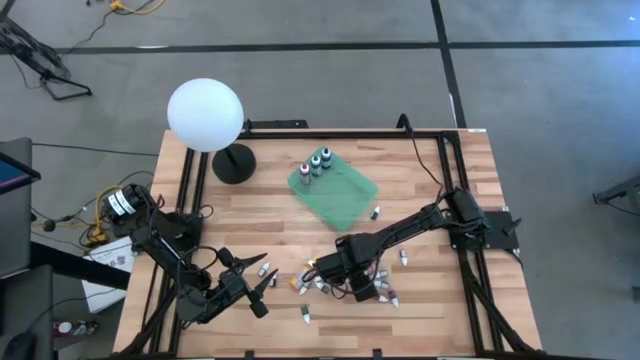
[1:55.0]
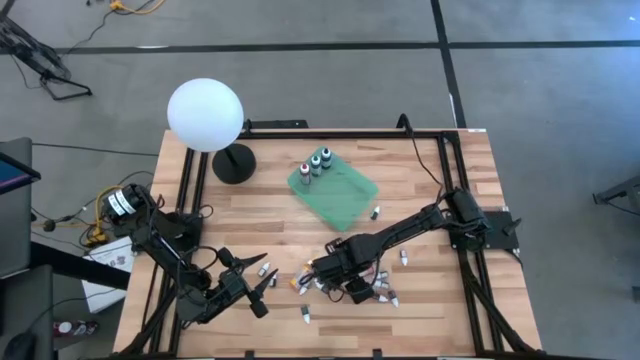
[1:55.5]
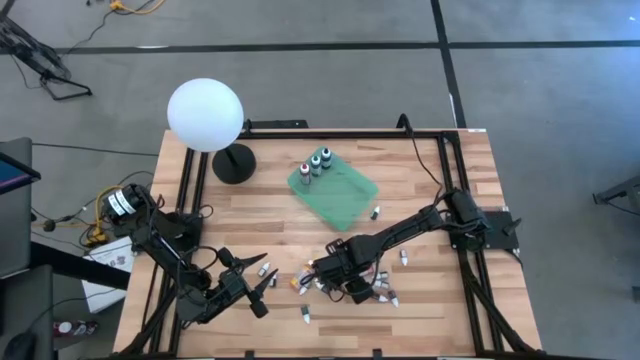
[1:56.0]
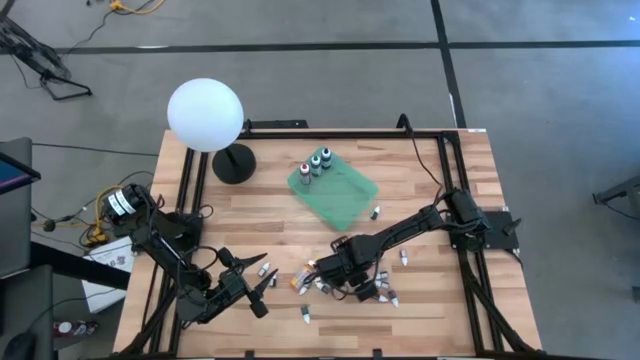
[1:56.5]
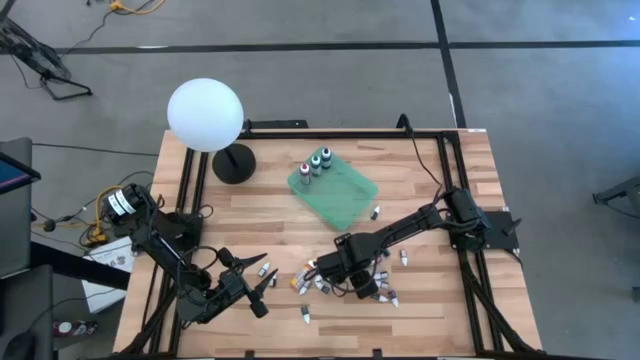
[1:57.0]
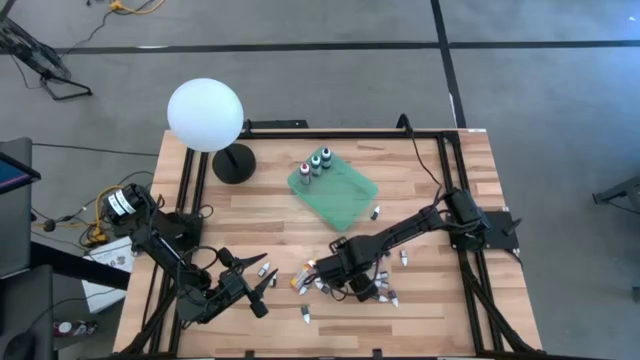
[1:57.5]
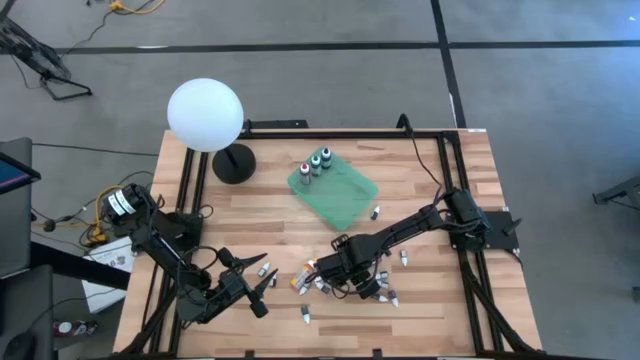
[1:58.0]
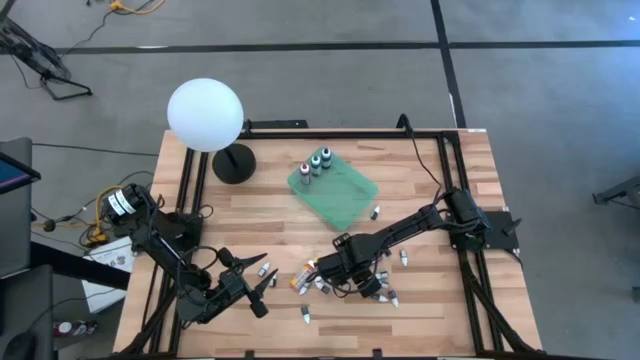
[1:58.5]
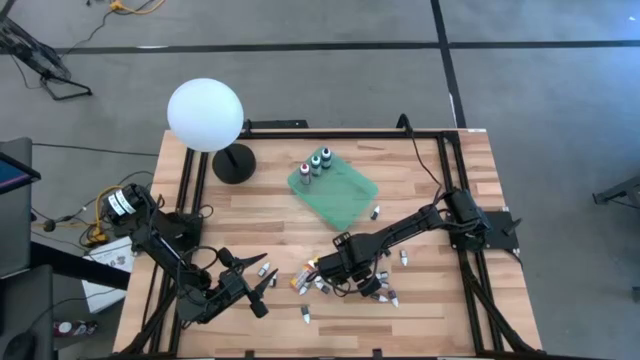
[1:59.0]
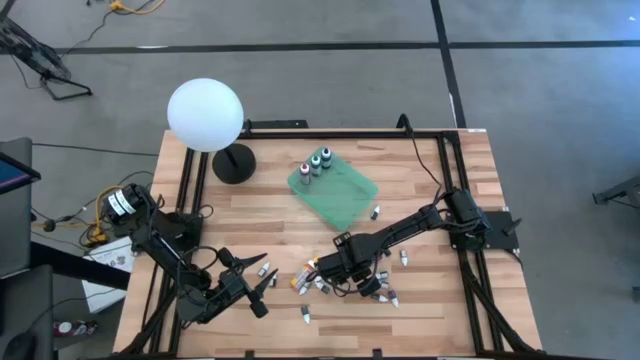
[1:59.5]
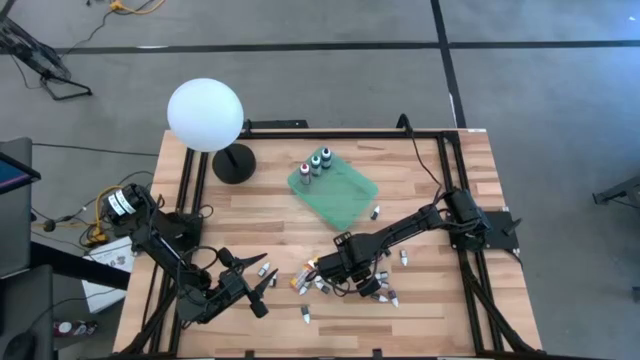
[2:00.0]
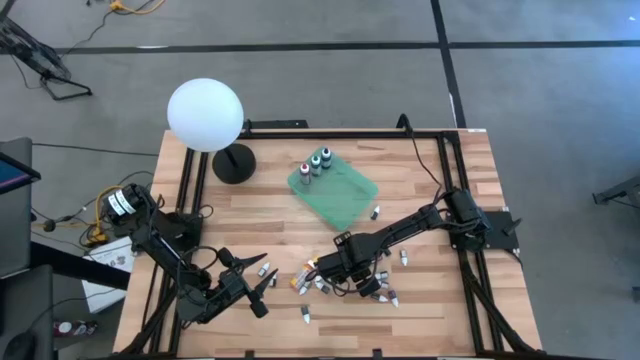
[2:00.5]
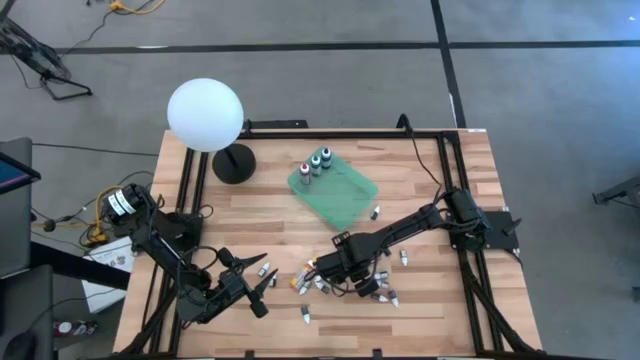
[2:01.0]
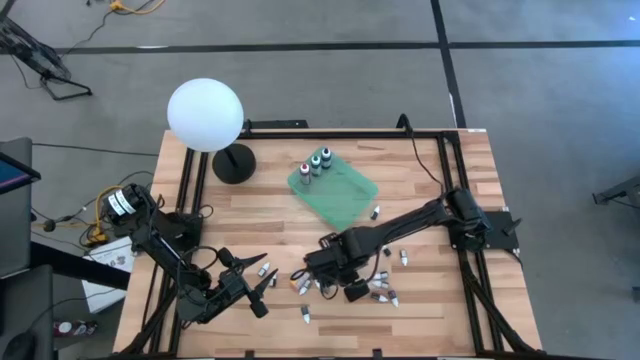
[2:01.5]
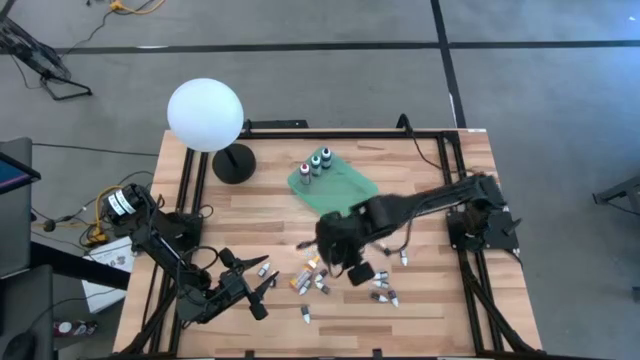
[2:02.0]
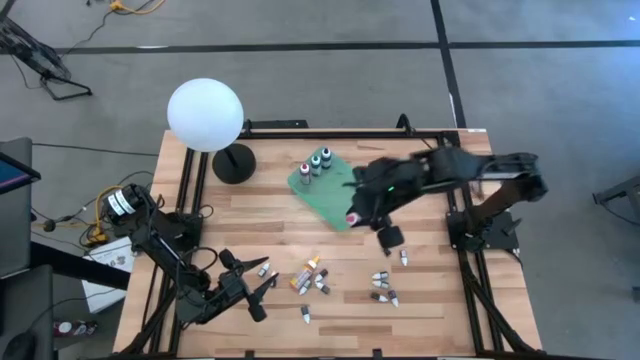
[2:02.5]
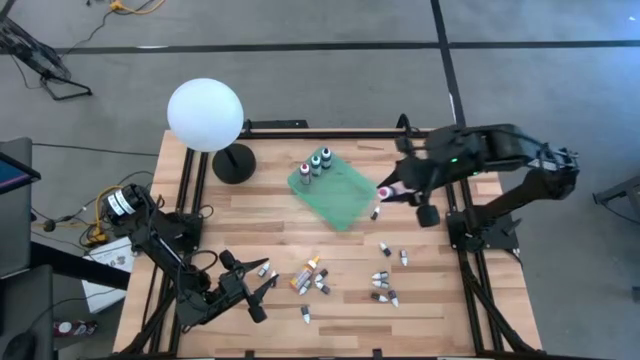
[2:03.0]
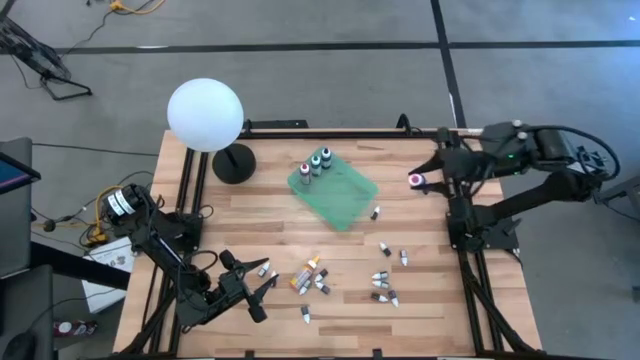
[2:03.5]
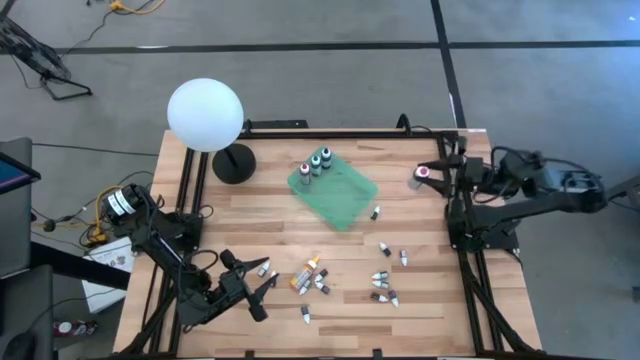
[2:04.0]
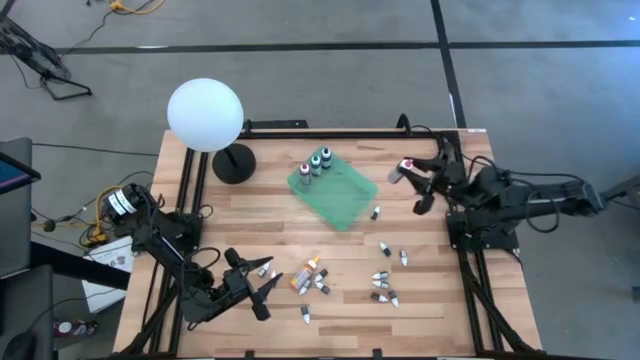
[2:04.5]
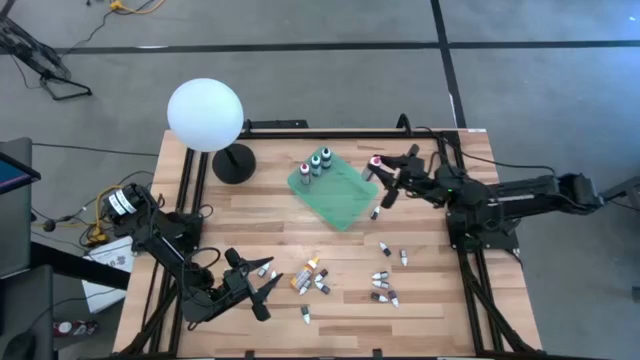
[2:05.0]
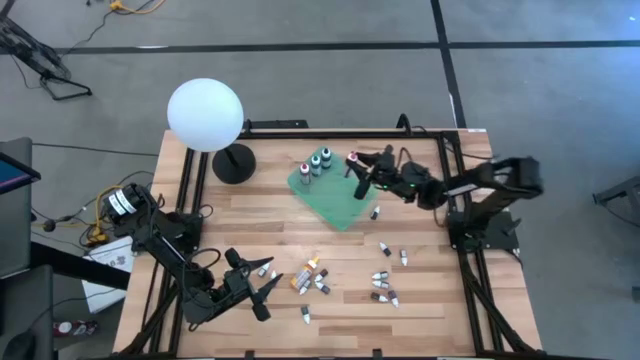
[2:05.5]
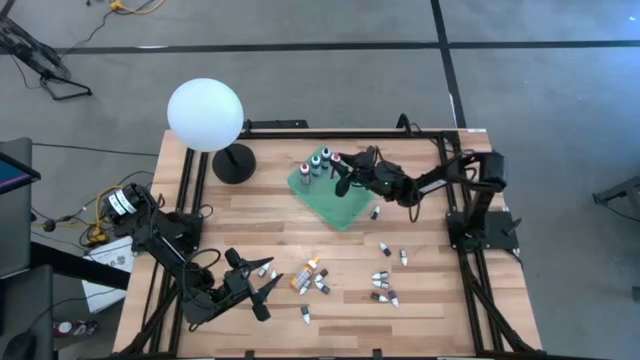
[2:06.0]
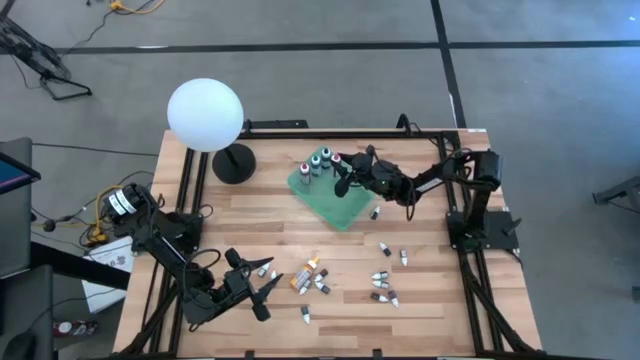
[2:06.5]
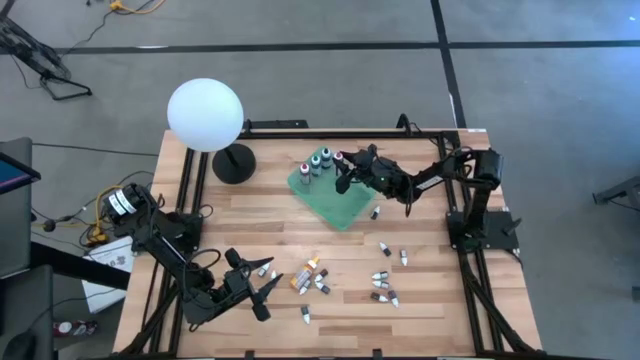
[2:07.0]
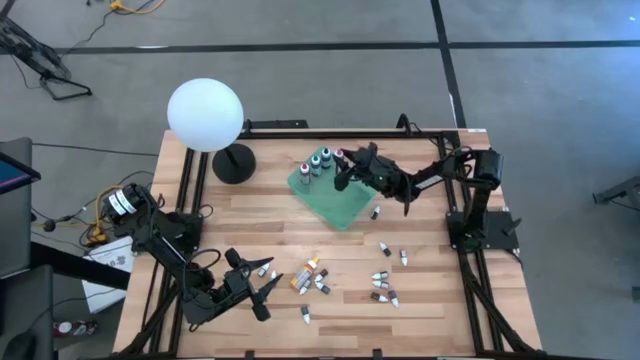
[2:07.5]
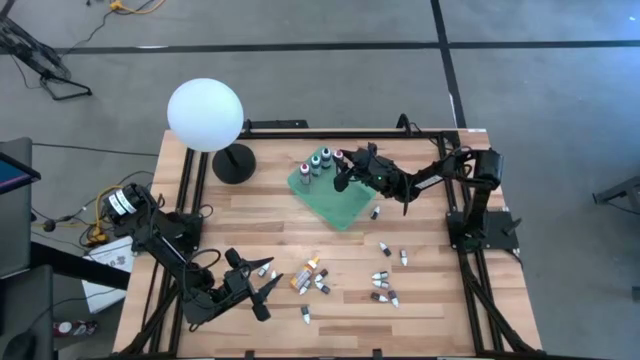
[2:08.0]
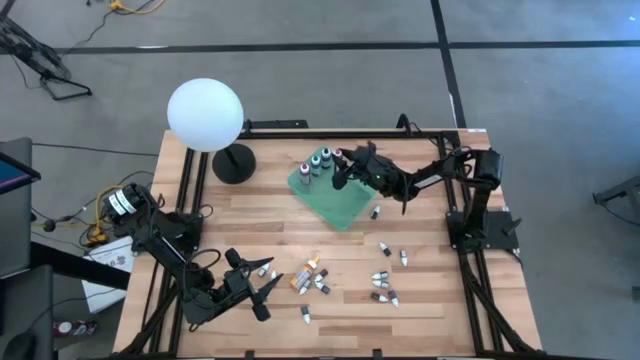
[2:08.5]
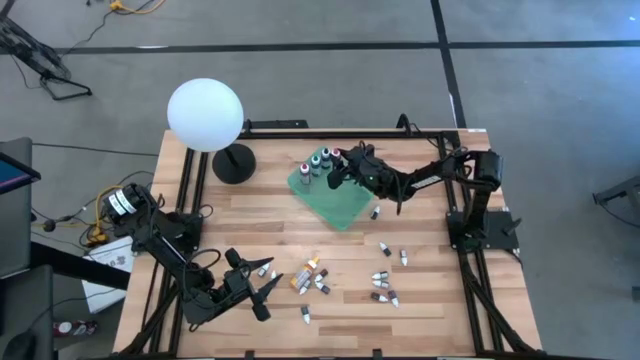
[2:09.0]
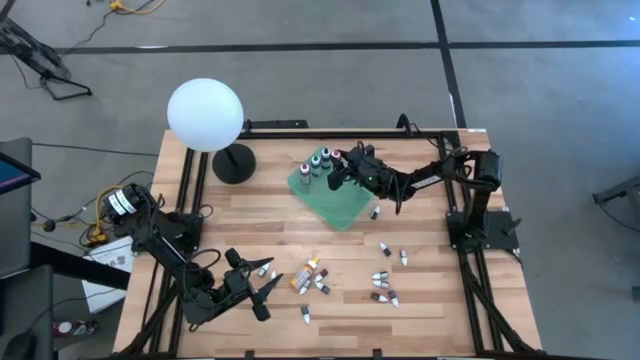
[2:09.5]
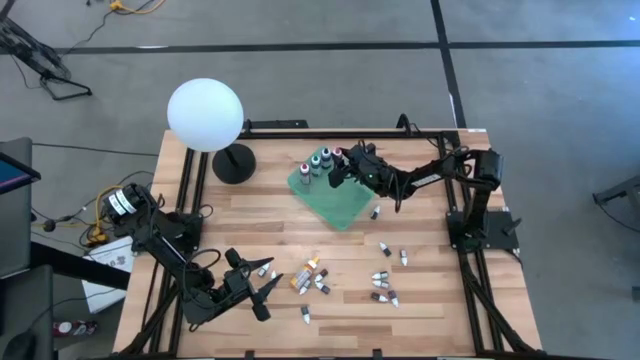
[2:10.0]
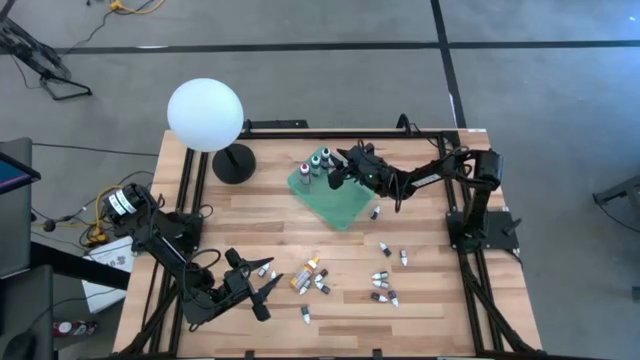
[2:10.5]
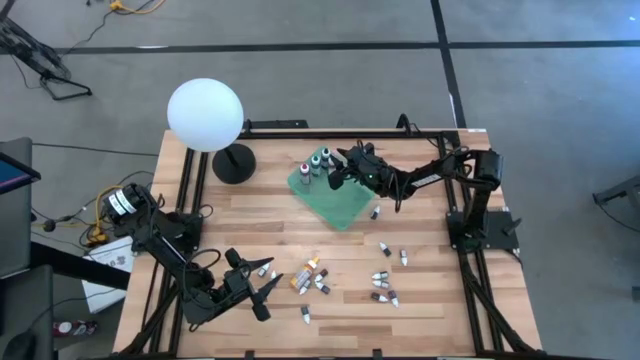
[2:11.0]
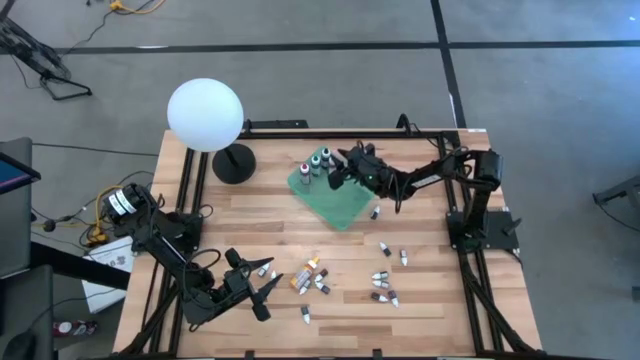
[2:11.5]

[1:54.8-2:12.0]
Task: Pick & Place food coloring
Put the large pink food coloring bottle into the green bin

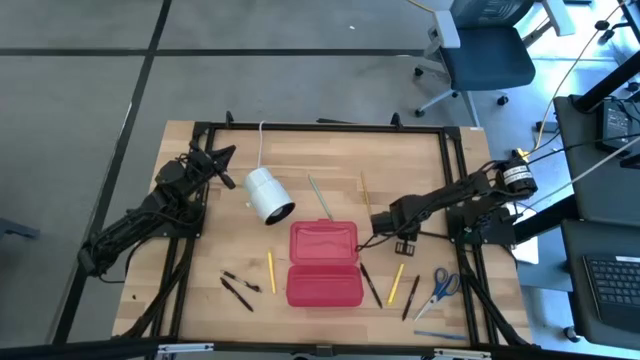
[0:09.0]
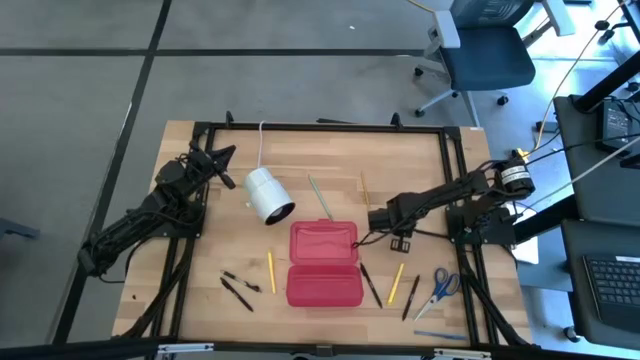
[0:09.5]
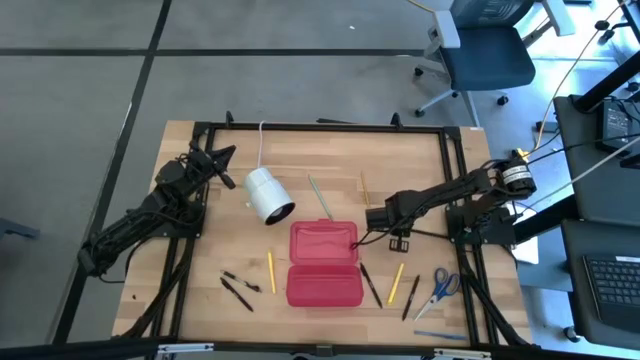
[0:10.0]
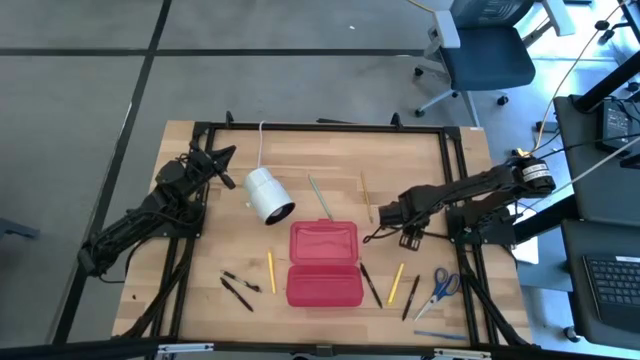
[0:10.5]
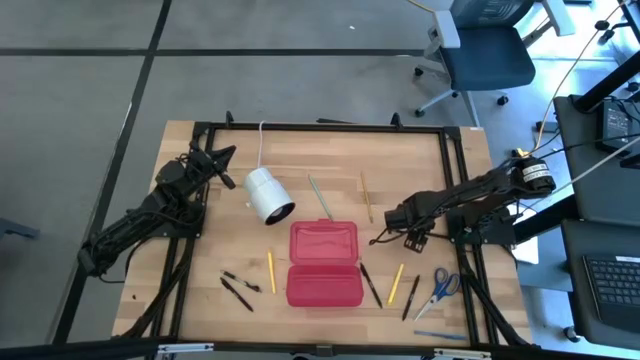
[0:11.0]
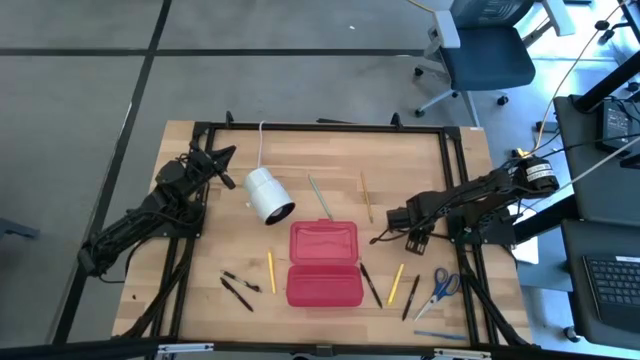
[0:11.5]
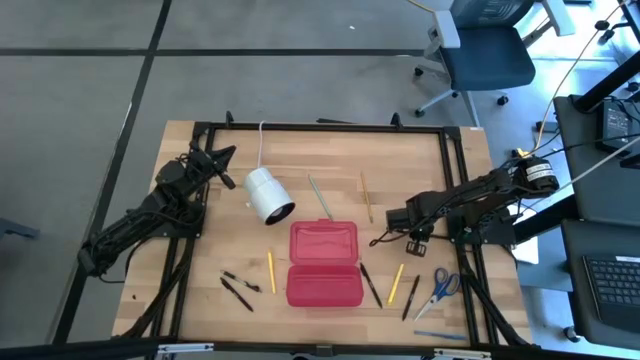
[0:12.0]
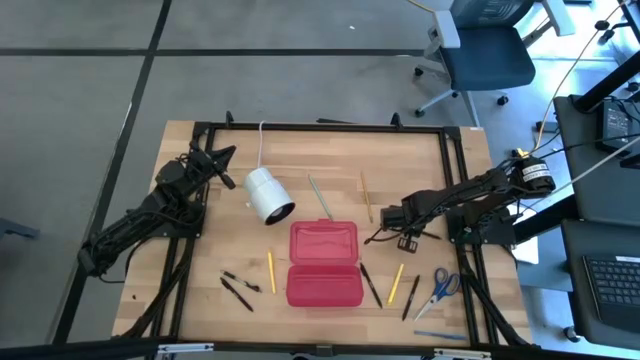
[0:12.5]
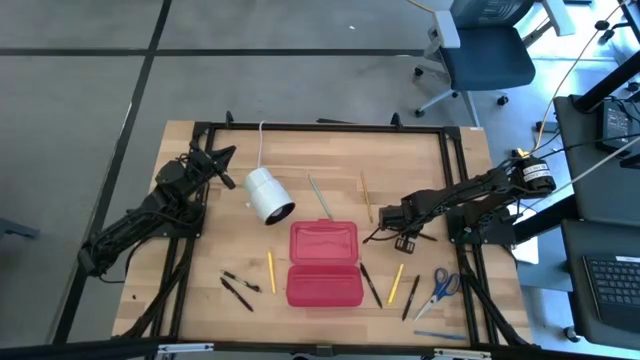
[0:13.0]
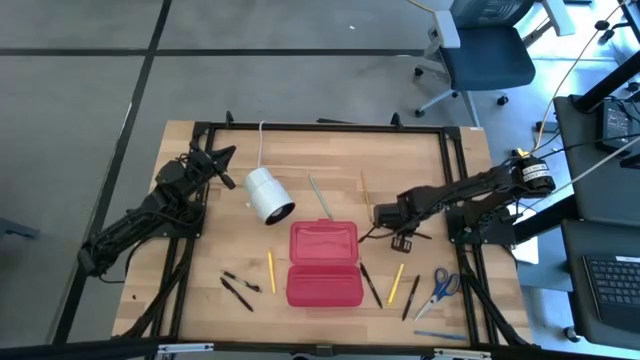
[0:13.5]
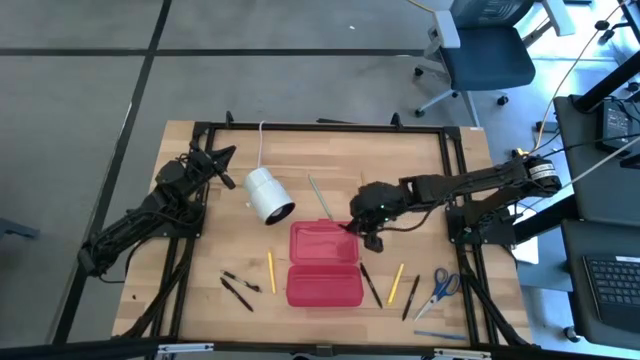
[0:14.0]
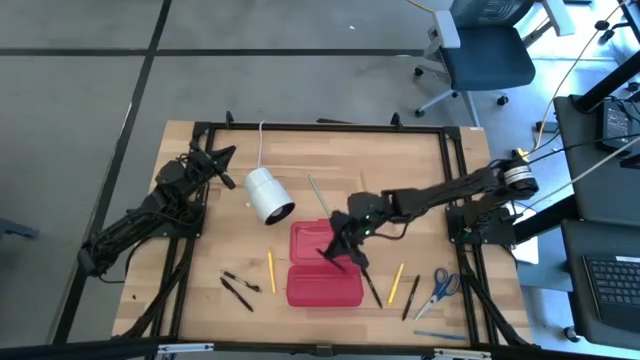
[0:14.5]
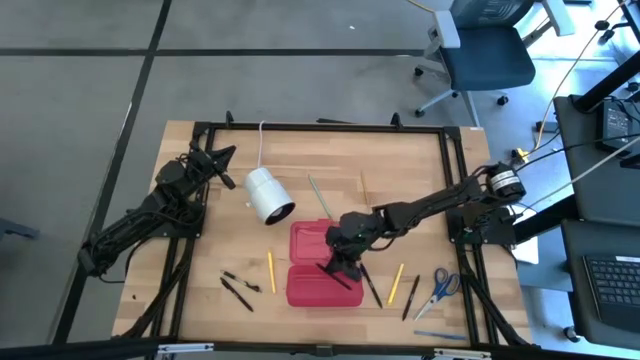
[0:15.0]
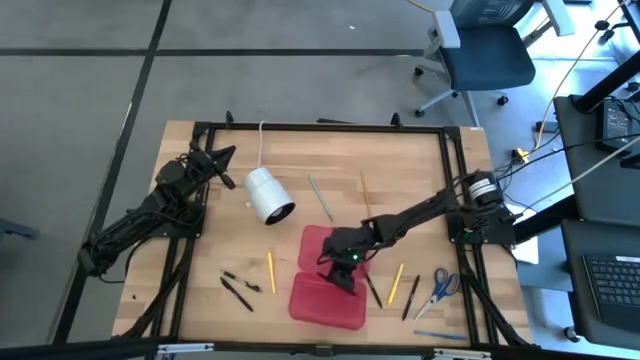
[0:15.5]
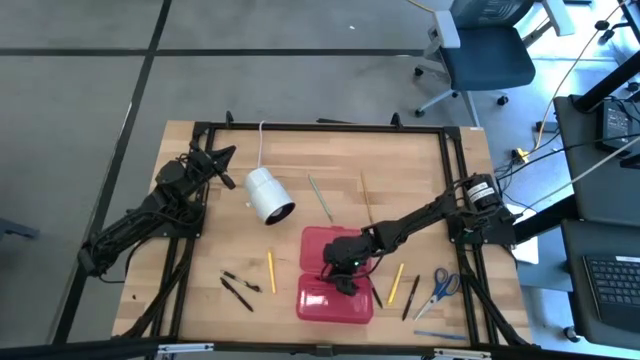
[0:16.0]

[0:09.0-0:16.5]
Task: Pick & place school supplies into a supply box
Put the black pen into the pink supply box
